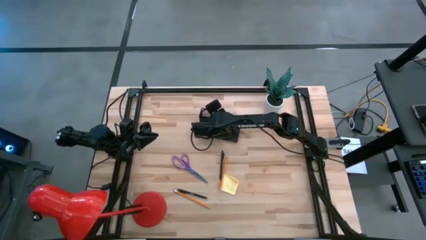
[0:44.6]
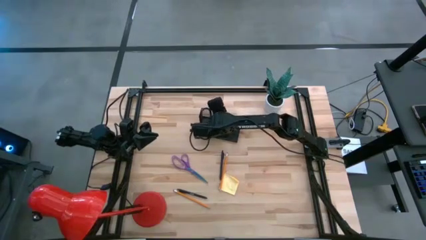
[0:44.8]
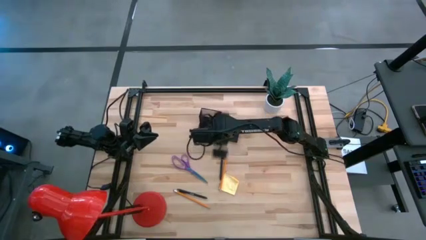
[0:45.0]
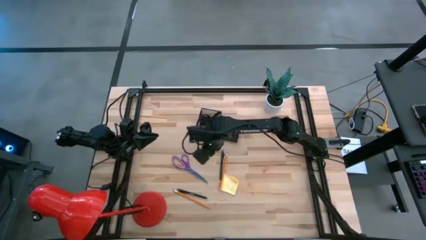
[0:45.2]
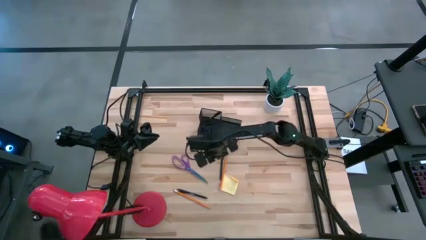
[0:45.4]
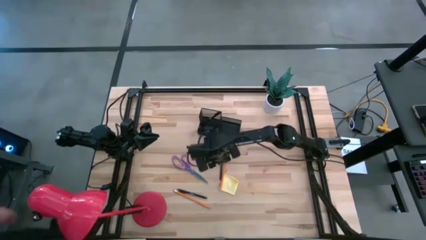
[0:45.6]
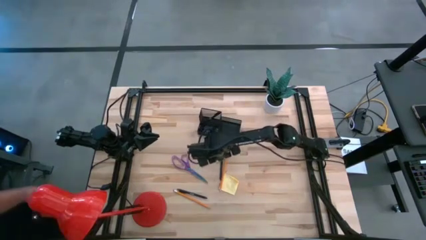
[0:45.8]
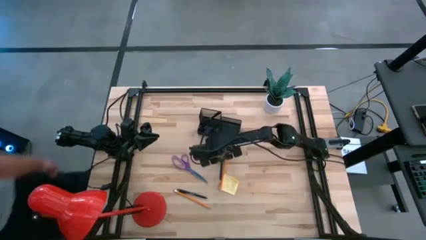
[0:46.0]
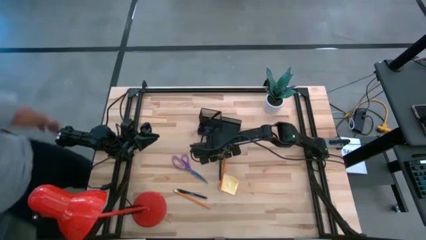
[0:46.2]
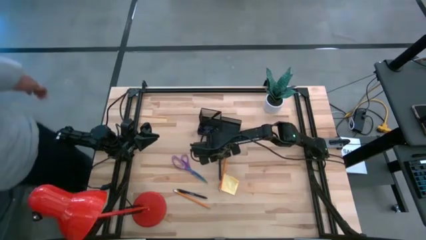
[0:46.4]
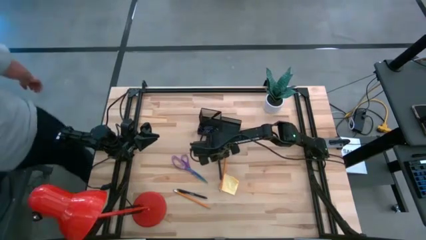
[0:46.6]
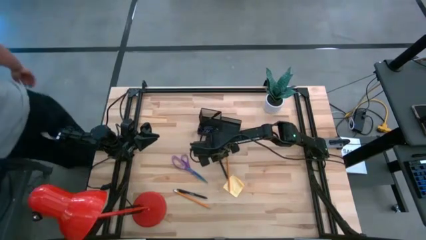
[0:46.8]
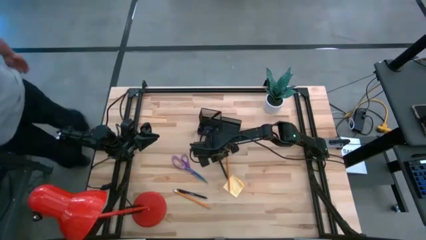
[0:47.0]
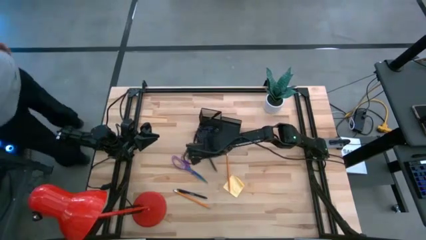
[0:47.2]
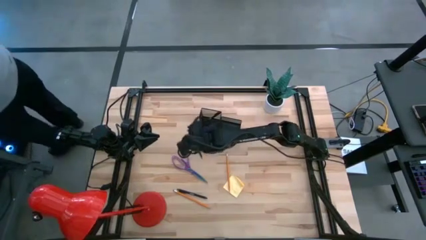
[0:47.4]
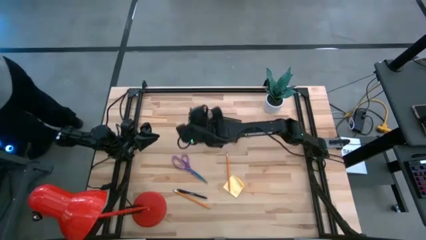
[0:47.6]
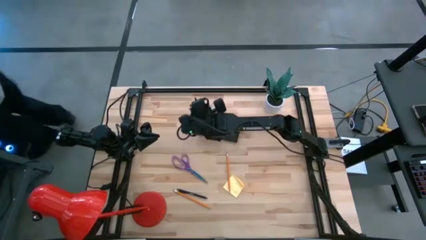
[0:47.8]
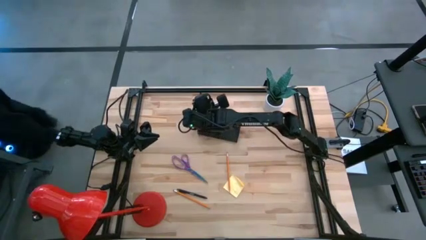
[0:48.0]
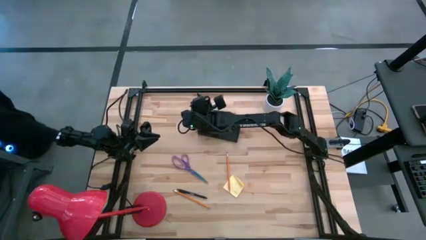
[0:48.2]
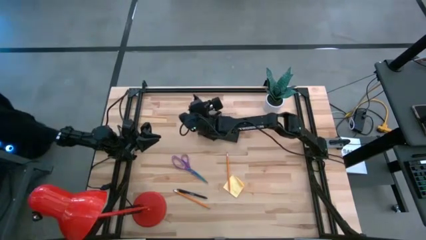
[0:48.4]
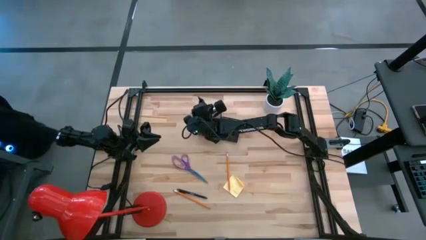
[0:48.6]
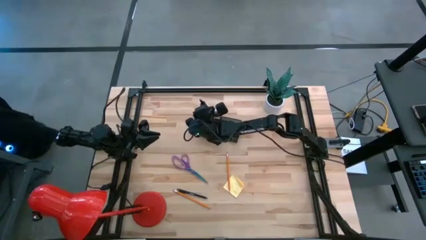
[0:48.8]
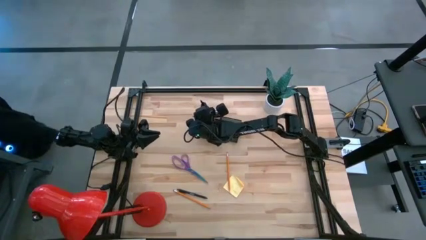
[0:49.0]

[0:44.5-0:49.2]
Task: Pick and place office supplies into organizer
Put the top black pen into the desk organizer

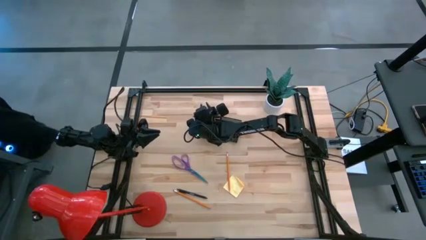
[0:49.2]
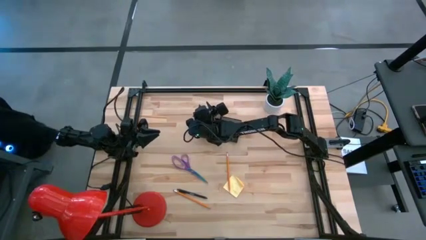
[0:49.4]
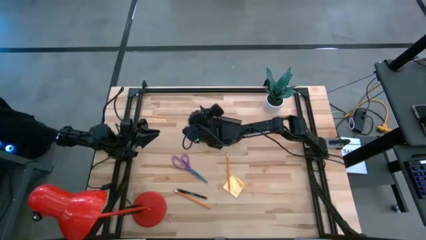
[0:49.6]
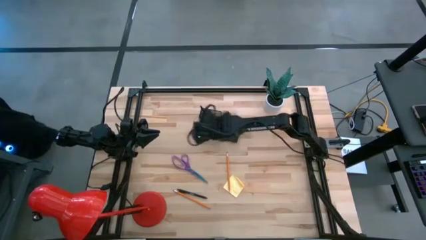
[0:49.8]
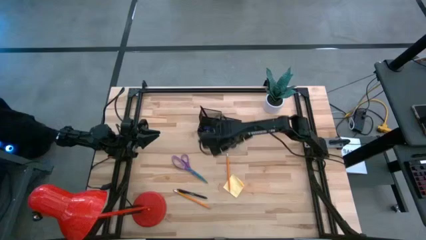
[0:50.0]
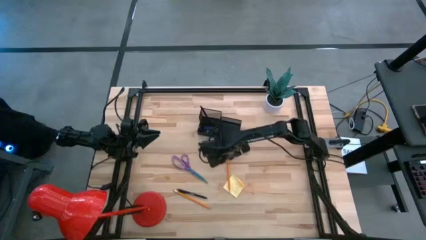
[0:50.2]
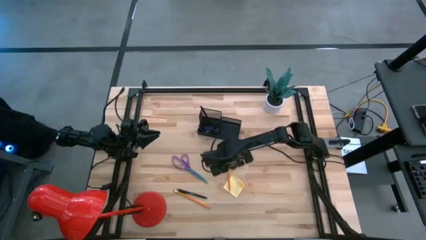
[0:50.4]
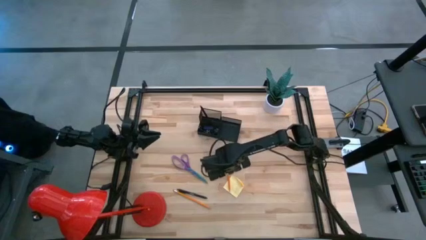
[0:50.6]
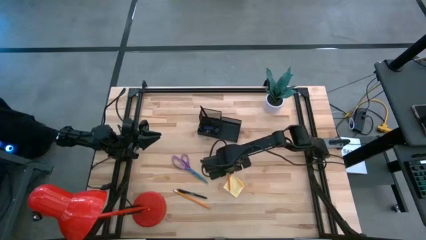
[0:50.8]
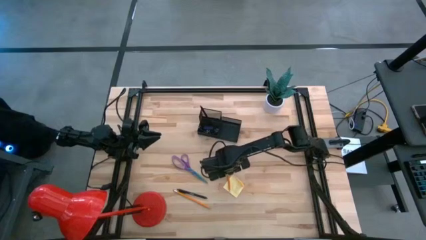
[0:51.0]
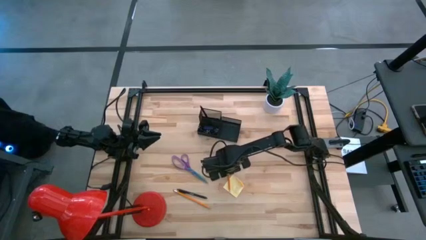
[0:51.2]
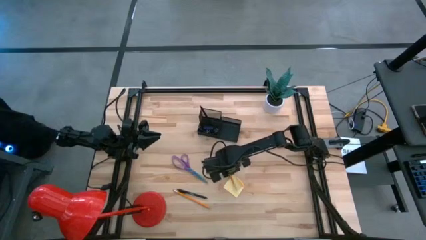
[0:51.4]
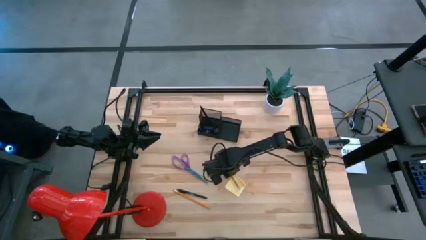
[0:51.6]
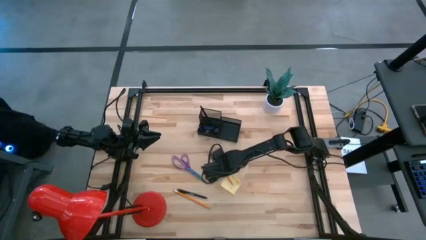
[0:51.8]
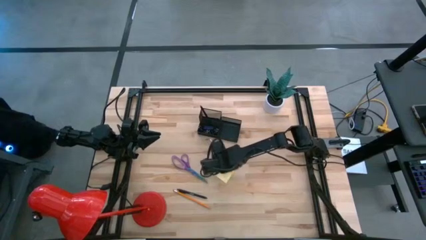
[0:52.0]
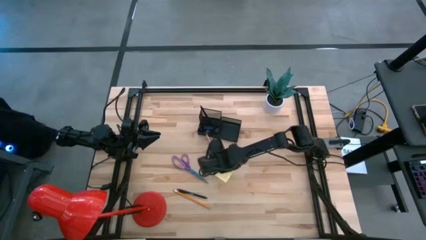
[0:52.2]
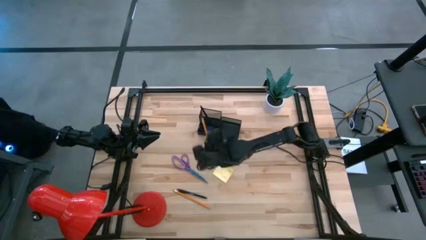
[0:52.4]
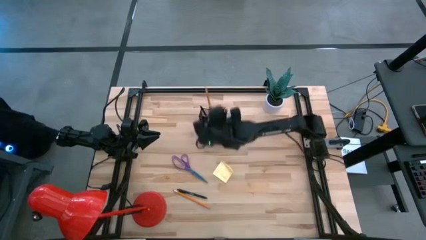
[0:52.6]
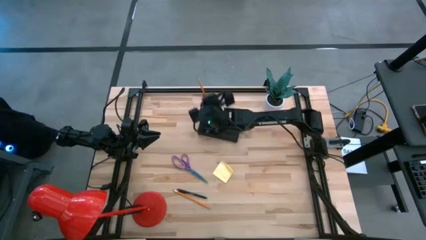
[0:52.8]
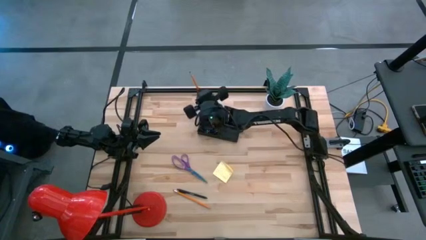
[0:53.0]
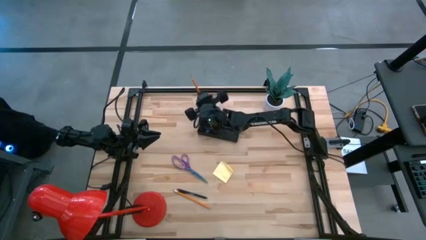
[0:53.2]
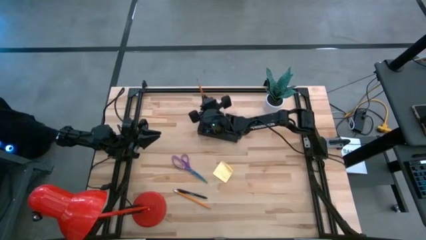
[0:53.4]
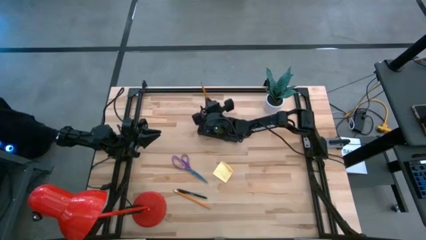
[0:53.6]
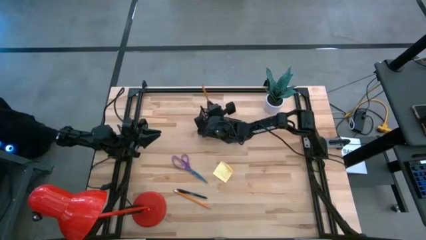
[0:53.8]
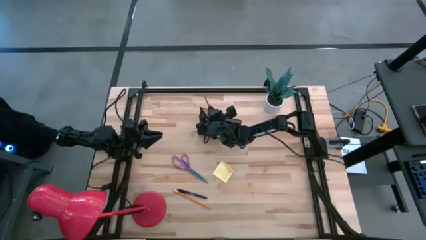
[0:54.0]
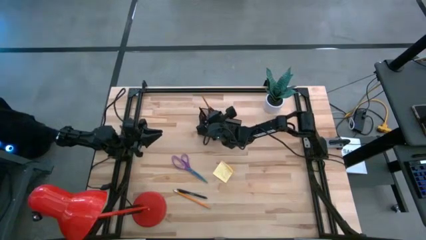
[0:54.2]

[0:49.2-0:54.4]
Put the right pencil into the desk organizer

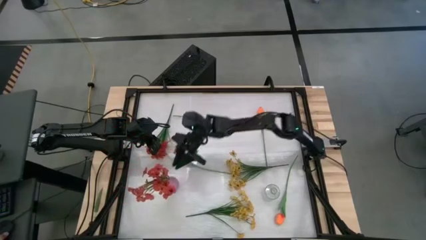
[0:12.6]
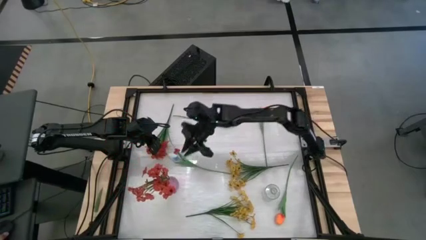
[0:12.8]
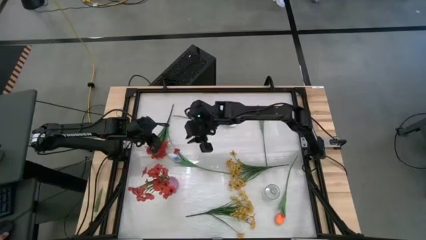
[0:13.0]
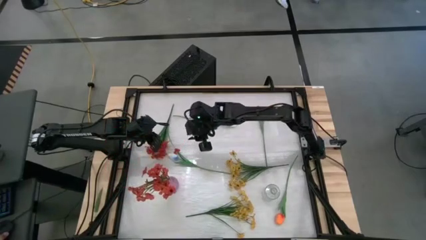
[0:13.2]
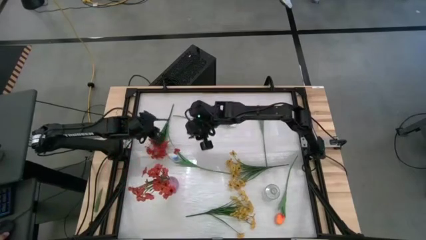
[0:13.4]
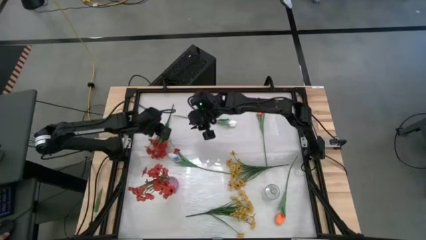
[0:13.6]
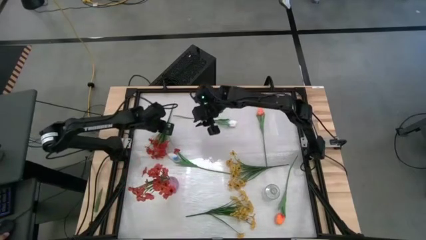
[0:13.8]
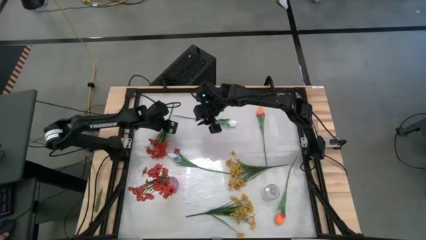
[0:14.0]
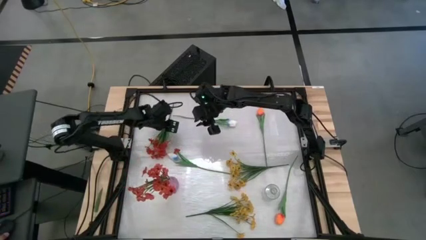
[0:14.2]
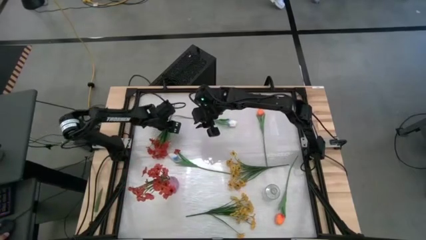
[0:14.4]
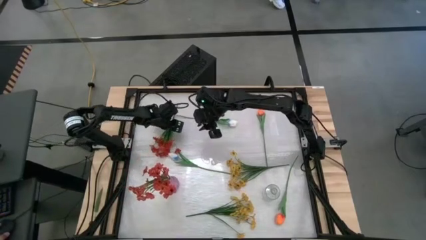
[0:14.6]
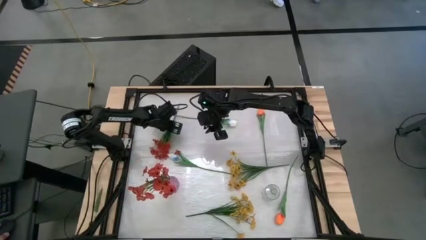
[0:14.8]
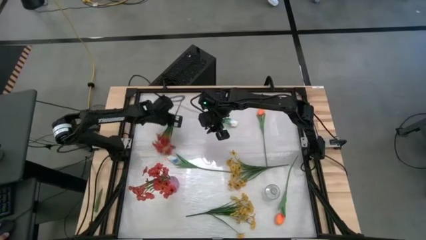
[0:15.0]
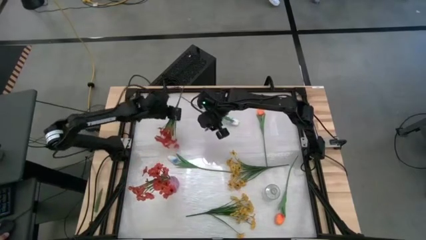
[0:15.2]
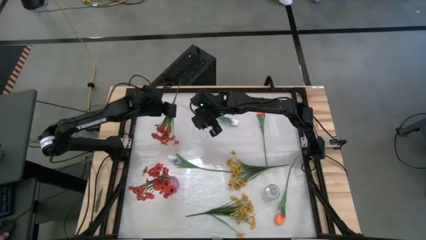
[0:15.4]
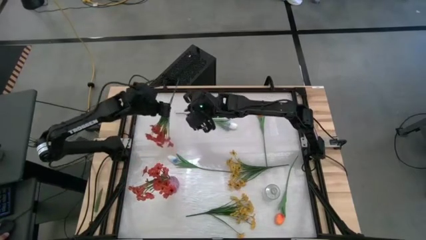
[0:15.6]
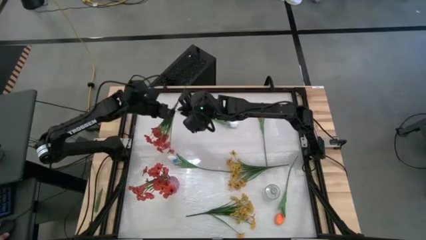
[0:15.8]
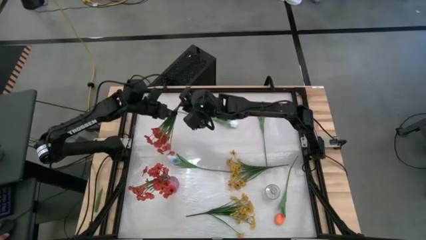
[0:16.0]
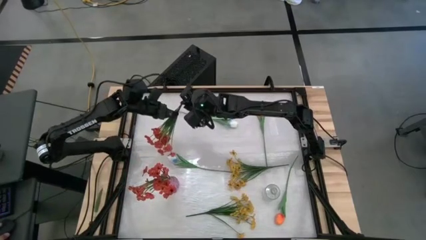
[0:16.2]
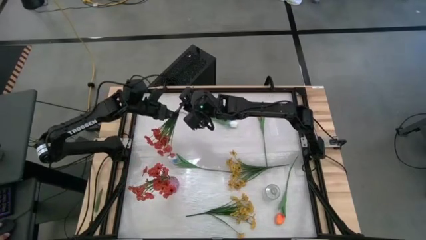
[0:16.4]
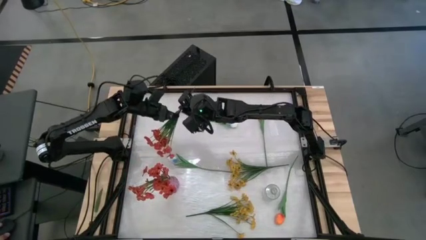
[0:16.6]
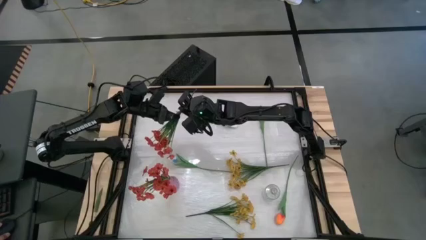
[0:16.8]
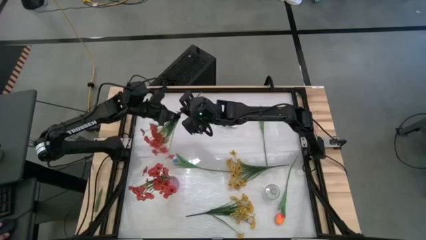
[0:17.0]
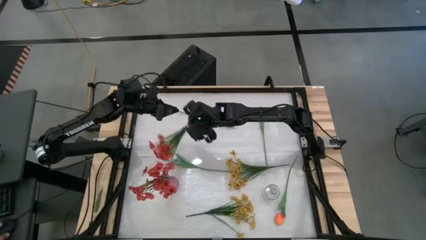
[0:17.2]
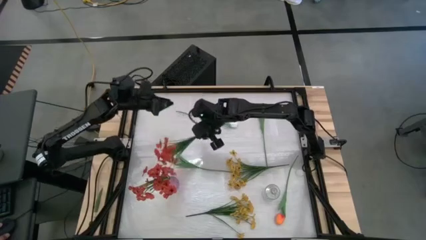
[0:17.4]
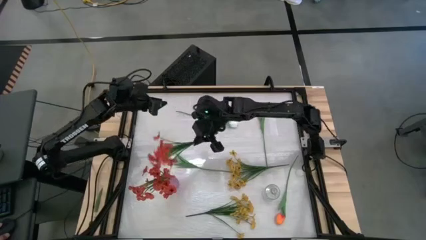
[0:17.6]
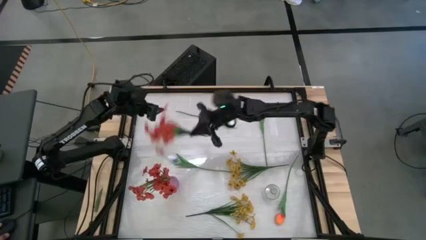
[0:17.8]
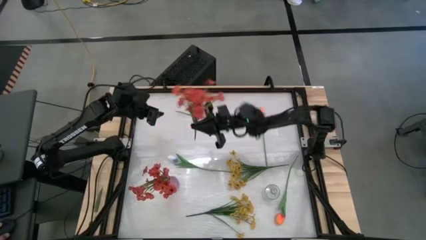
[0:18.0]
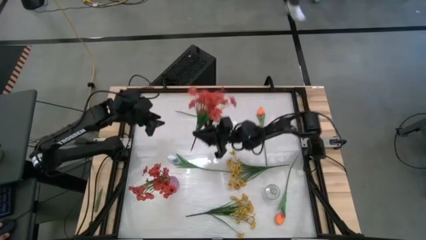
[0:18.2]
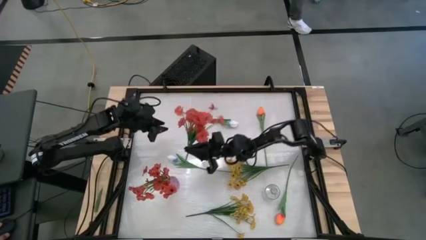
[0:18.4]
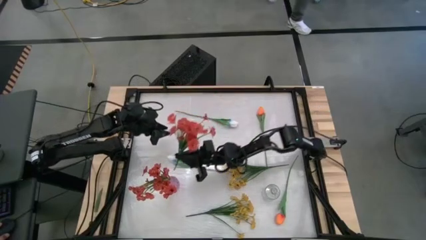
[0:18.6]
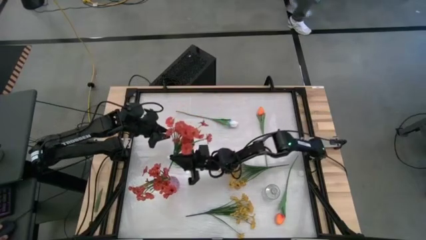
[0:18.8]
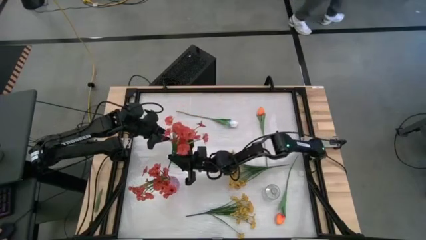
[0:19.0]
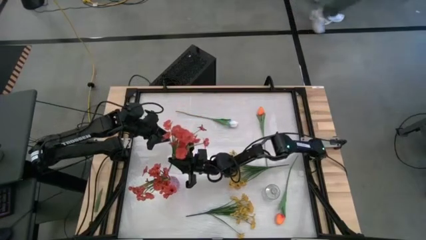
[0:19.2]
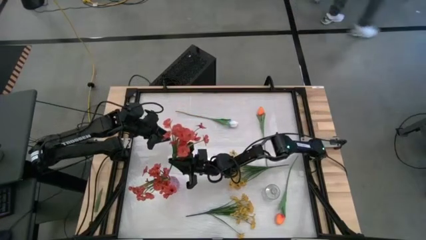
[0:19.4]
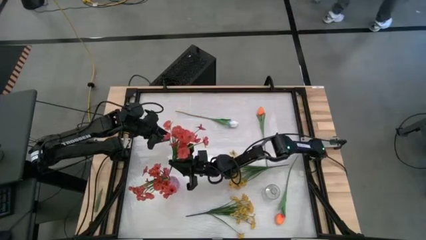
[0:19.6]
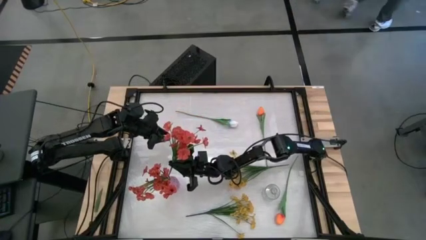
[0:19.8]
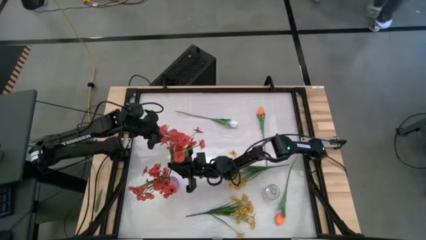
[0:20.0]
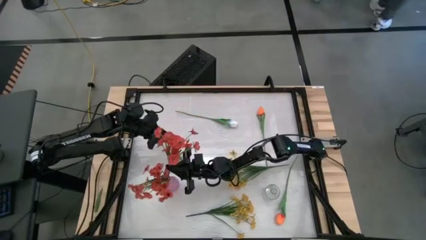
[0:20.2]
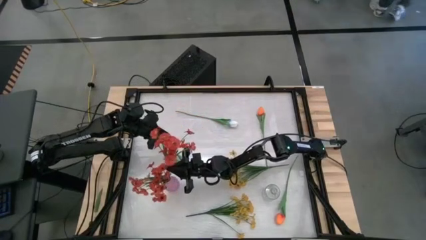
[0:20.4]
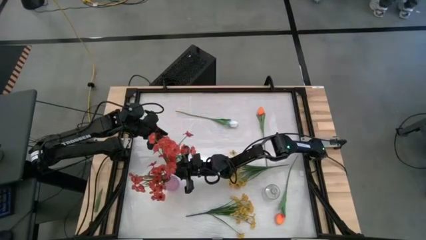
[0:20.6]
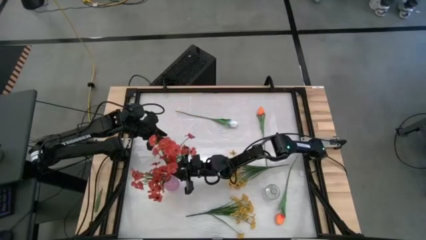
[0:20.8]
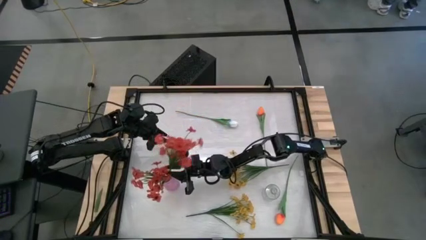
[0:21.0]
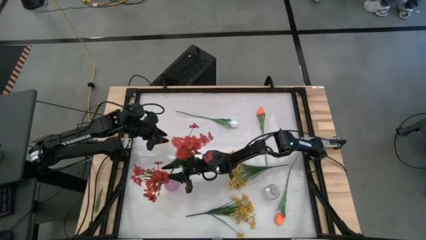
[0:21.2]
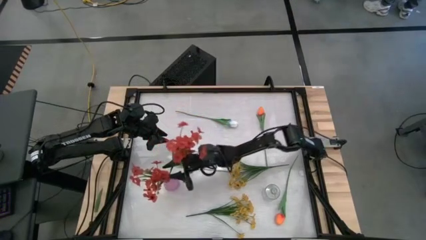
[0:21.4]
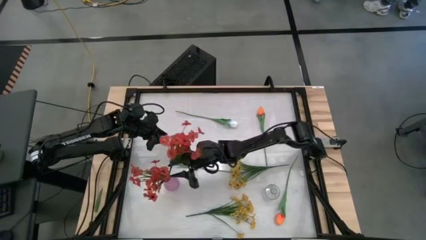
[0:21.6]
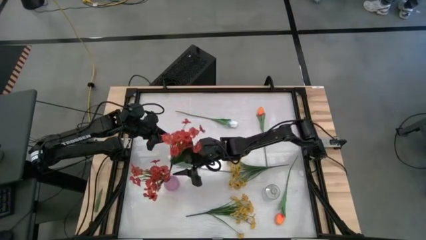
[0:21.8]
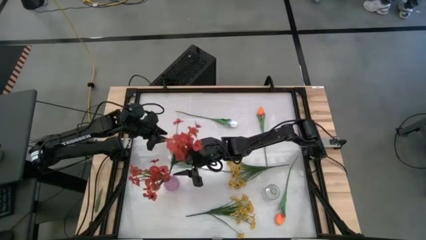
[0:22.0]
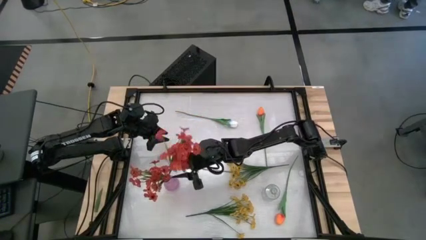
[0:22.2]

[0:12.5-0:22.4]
Task: Sort flowers into vase by color
Put the red flowers into the purple vase
